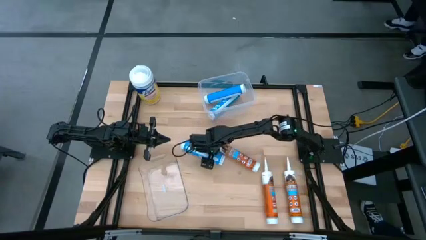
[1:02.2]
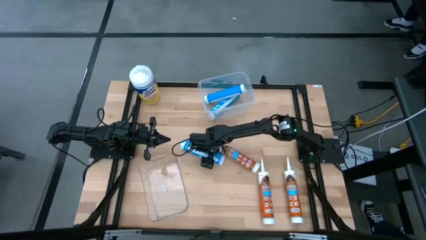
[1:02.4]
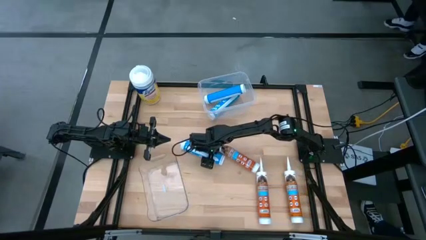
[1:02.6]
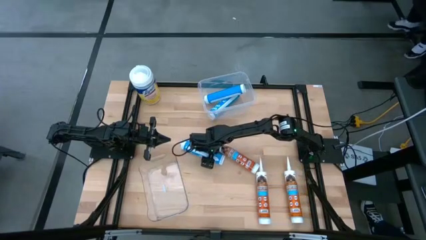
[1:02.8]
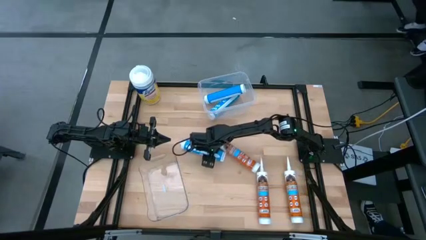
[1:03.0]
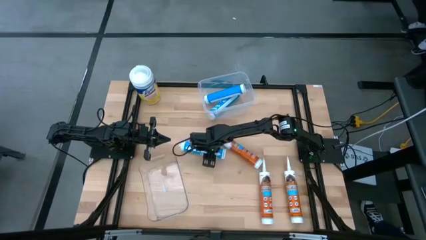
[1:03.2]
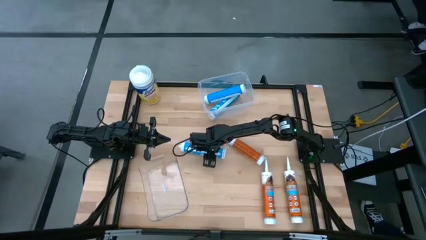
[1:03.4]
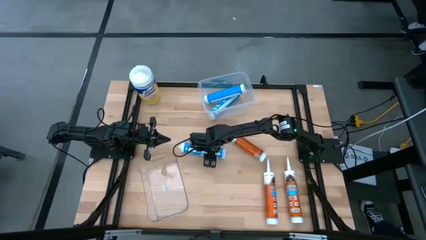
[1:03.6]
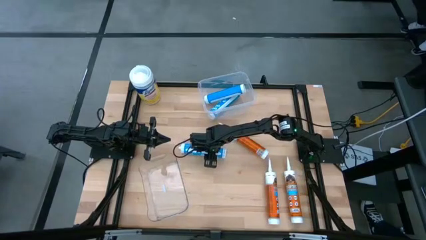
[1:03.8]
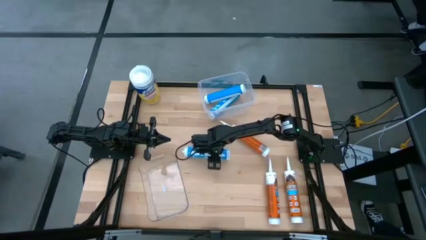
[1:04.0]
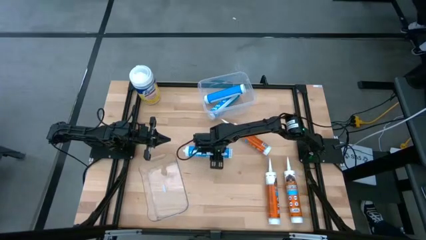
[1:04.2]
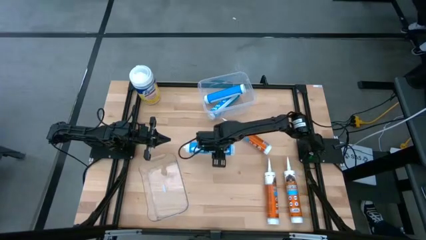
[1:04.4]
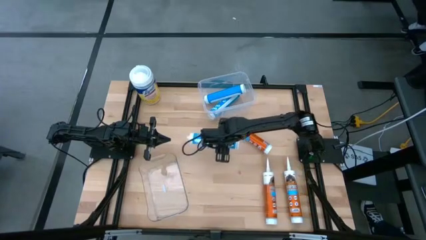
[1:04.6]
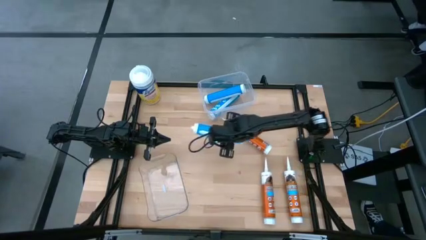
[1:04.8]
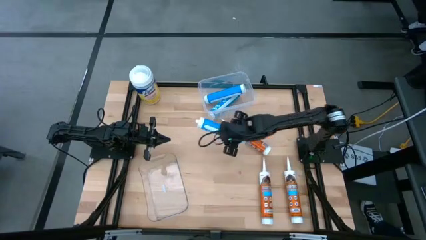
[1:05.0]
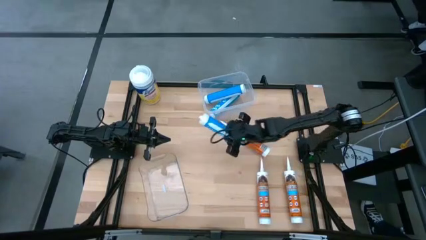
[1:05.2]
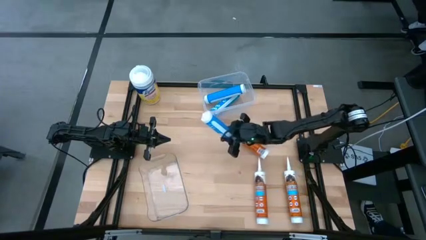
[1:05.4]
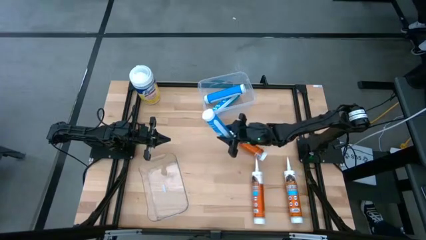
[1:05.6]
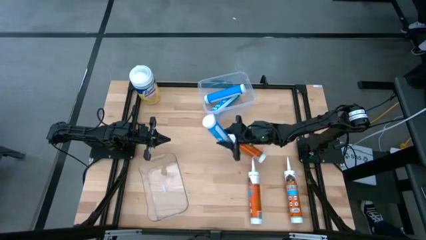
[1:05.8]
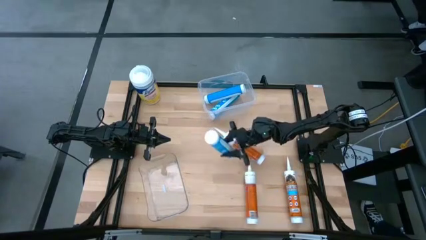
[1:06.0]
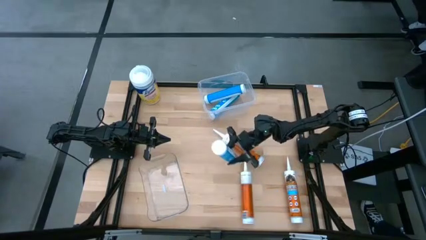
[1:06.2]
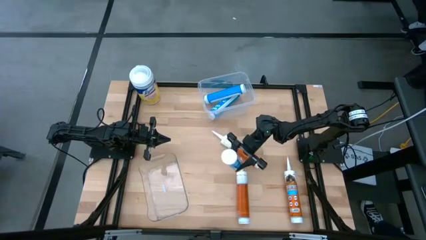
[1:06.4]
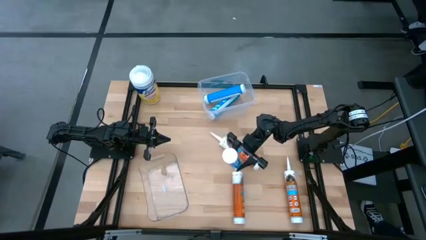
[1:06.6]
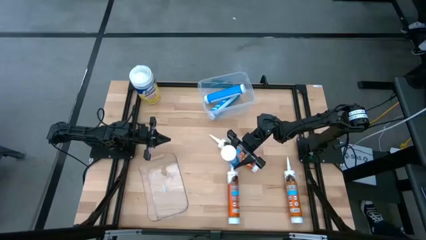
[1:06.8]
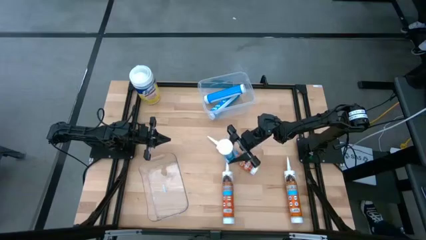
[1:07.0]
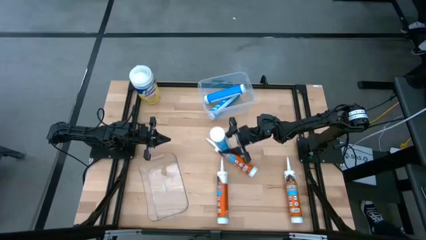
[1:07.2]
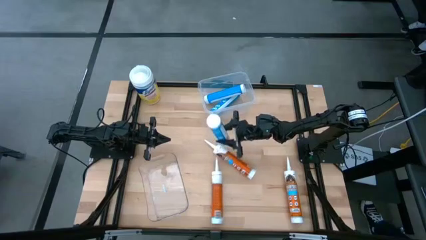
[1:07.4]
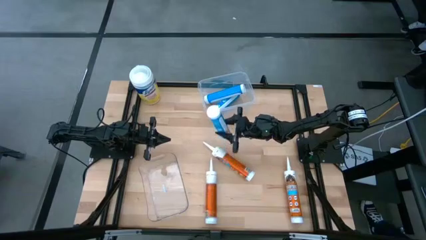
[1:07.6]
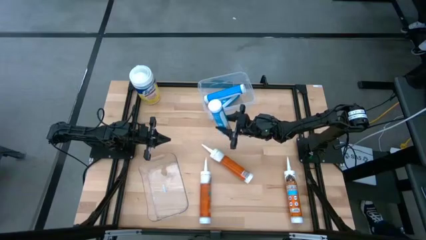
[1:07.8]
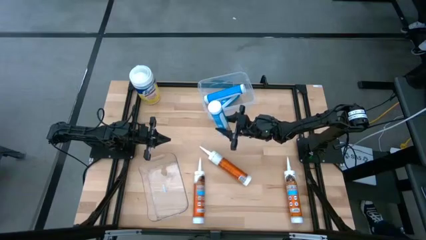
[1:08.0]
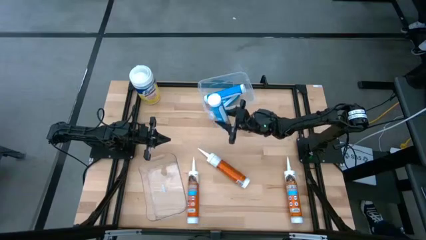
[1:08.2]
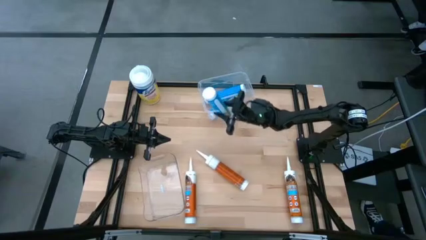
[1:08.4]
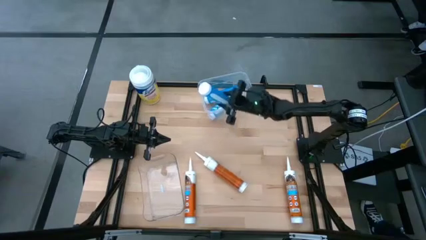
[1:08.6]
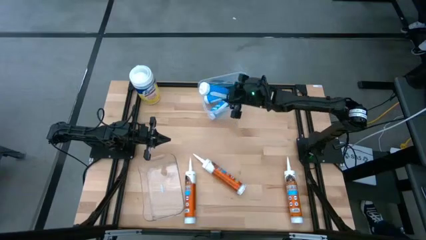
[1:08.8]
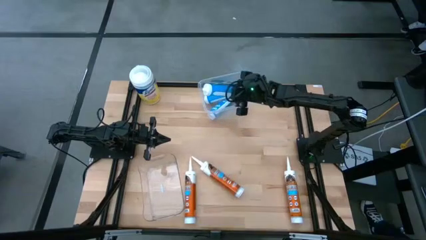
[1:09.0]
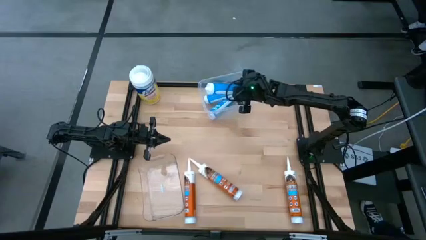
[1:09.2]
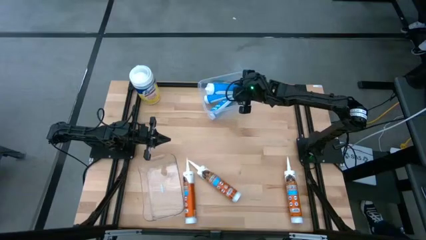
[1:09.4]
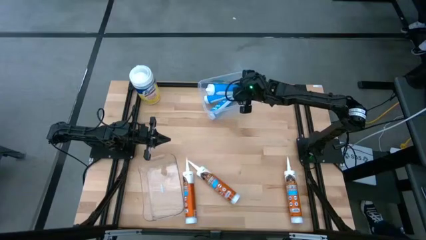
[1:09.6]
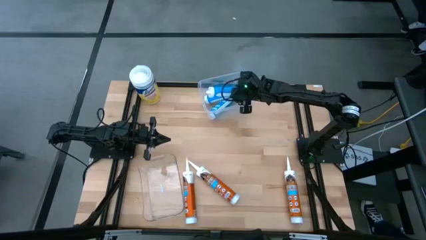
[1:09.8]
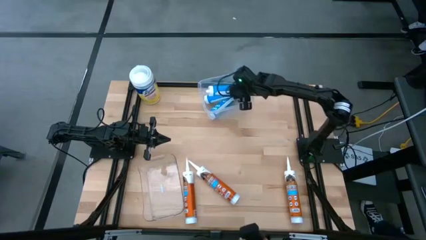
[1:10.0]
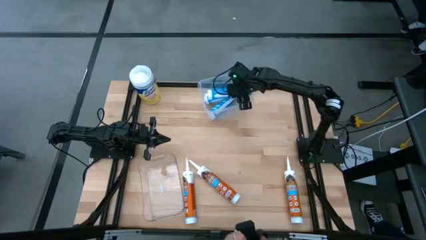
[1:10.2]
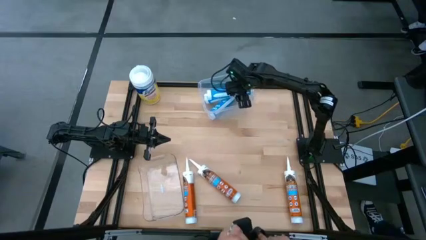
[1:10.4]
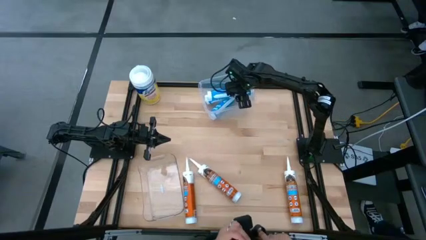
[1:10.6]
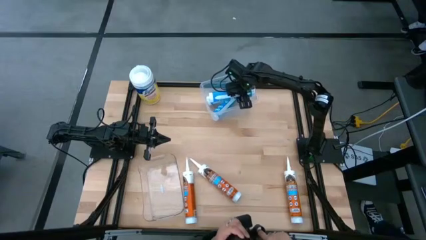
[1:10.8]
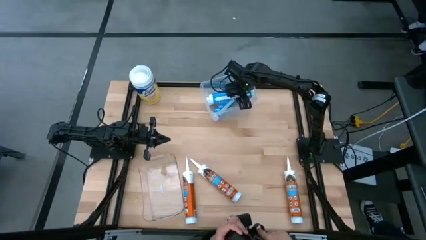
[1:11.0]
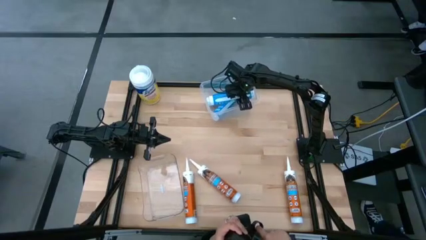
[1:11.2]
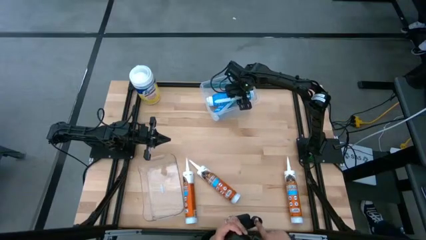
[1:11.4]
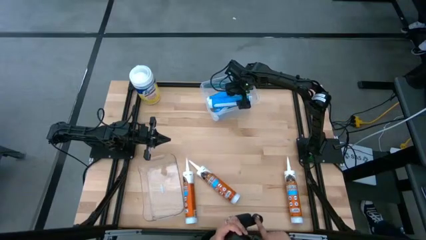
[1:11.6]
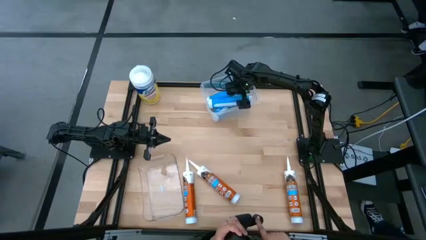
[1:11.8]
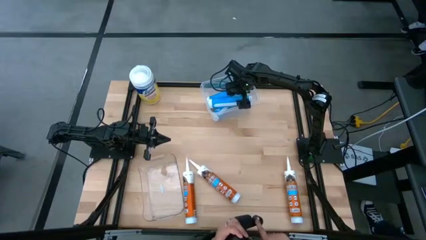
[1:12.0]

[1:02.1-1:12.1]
Task: Pick & place silicon tubes, Sealant and Lysol wipes
Put the blue sealant into the white bin

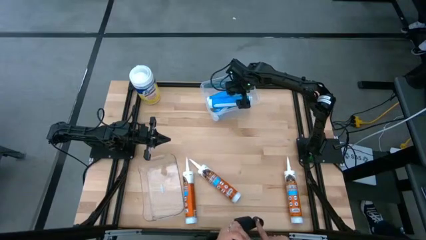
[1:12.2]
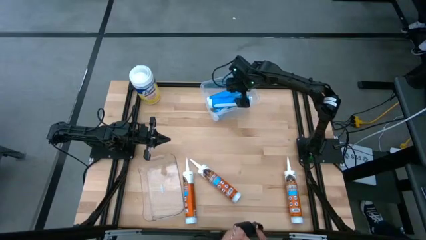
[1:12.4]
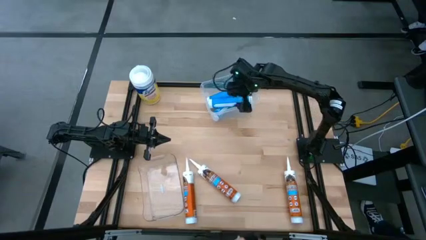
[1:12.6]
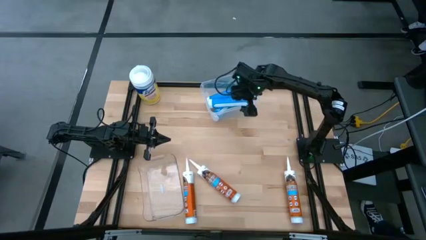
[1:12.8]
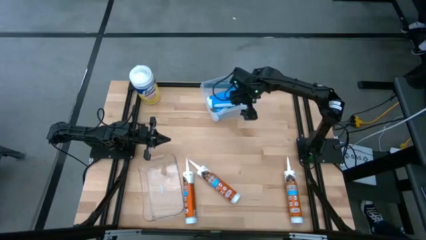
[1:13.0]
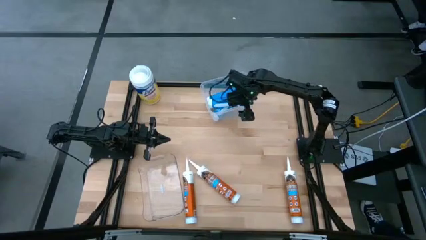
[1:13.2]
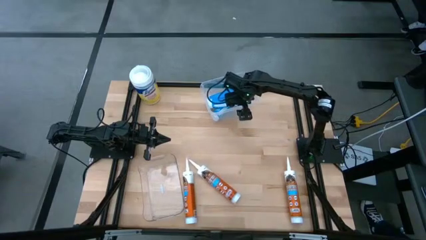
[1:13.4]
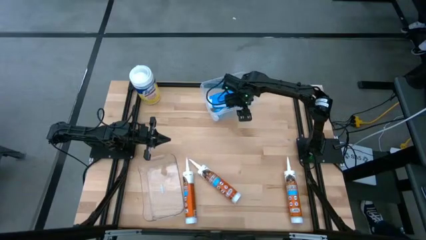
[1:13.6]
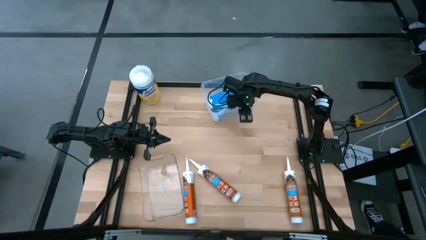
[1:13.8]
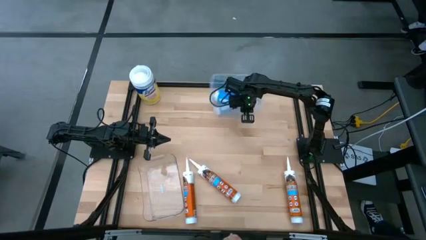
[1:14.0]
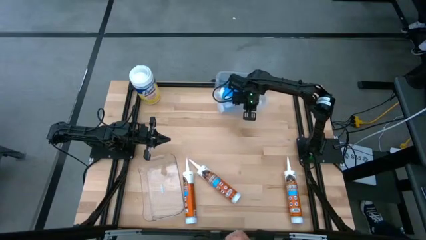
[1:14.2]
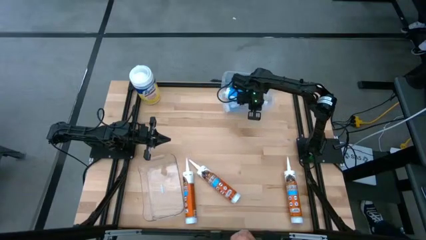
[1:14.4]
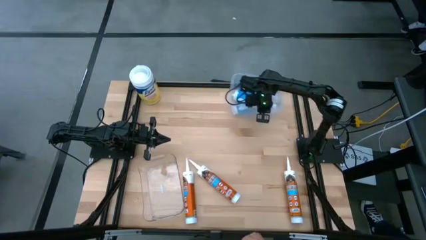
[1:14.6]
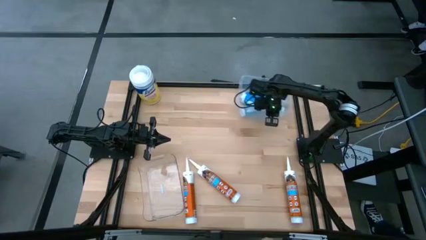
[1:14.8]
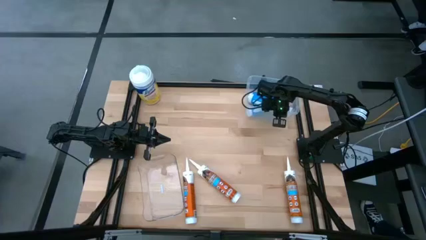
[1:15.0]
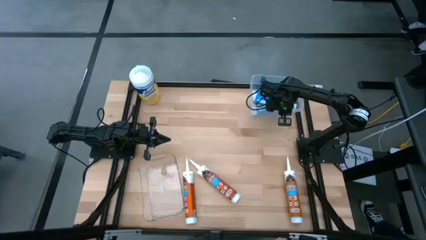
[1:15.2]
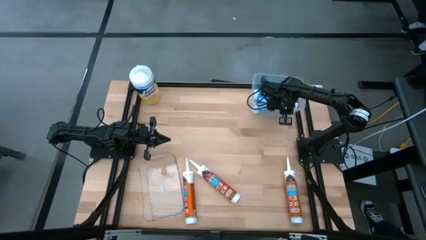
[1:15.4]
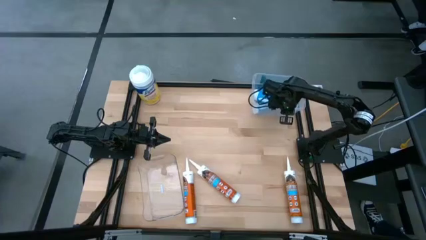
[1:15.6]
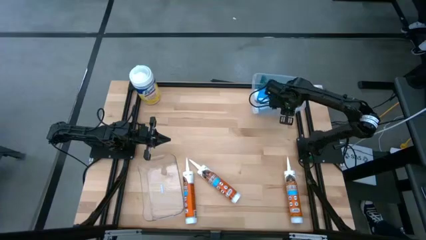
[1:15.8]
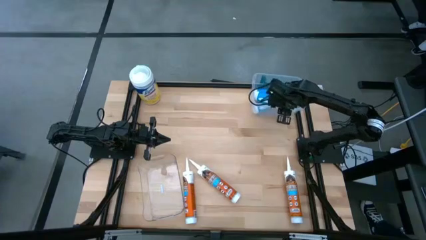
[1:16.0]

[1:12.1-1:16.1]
Move the white bin to the top right corner of the table
